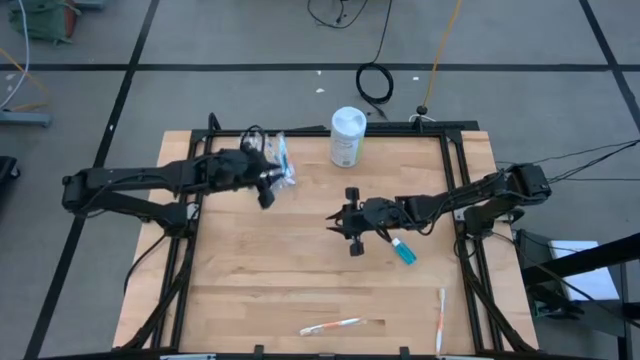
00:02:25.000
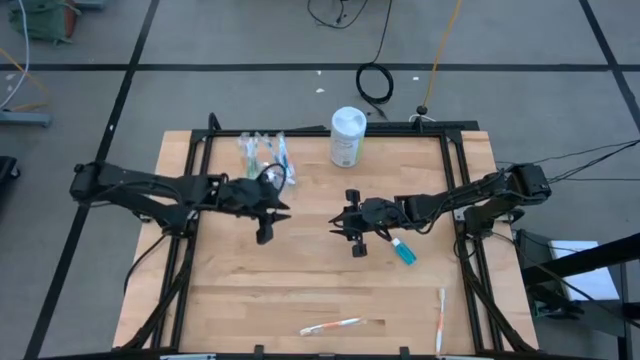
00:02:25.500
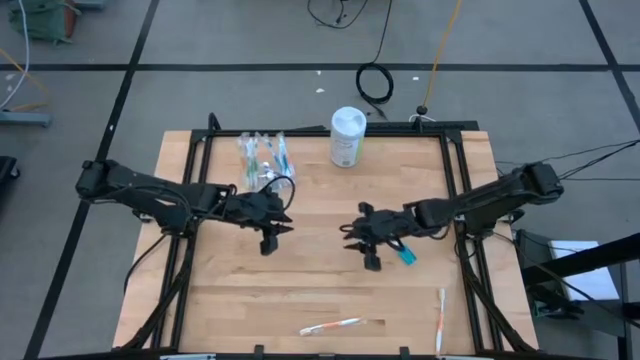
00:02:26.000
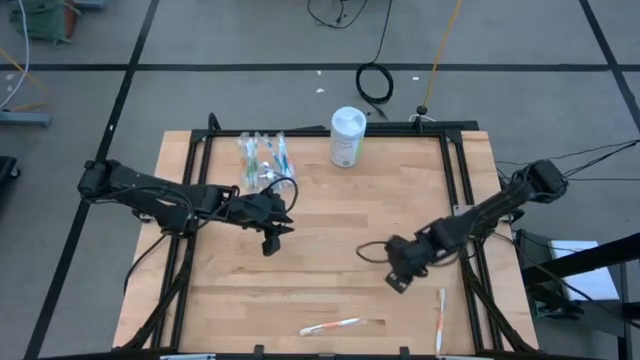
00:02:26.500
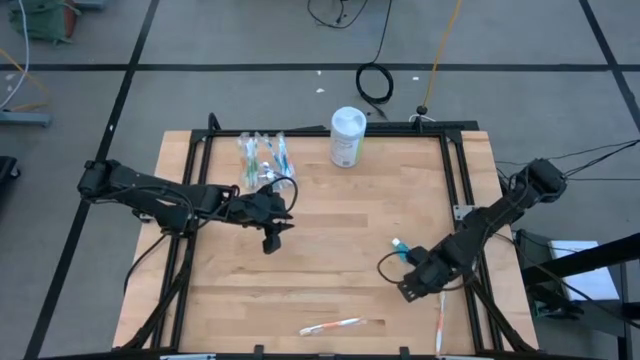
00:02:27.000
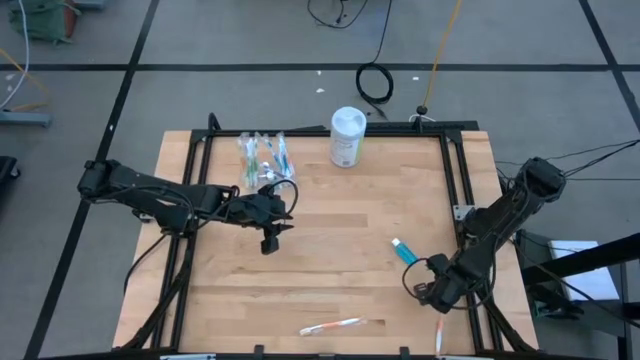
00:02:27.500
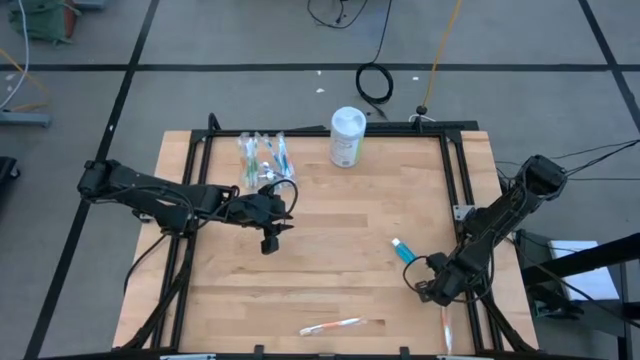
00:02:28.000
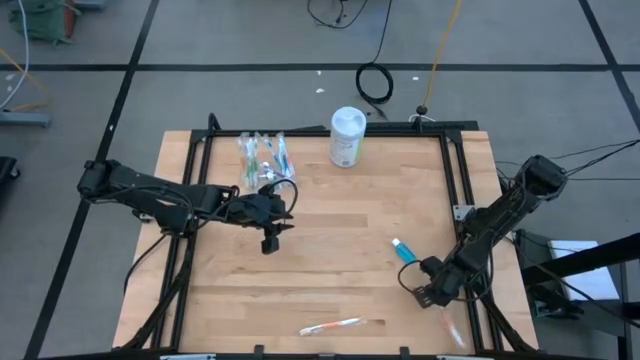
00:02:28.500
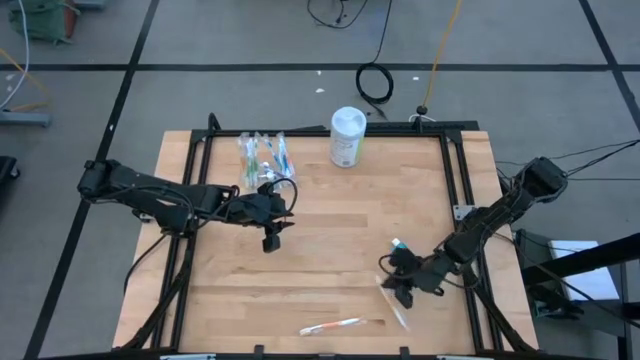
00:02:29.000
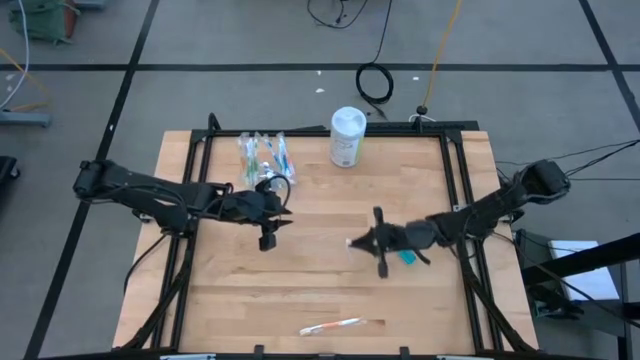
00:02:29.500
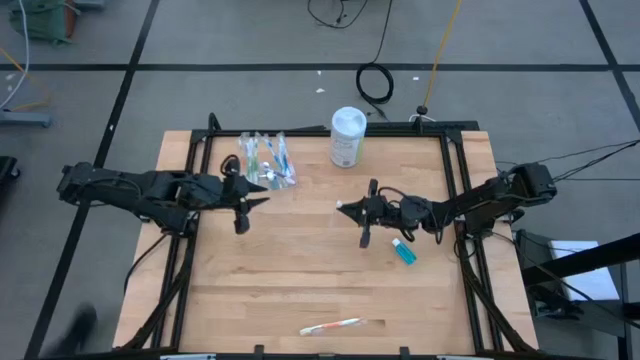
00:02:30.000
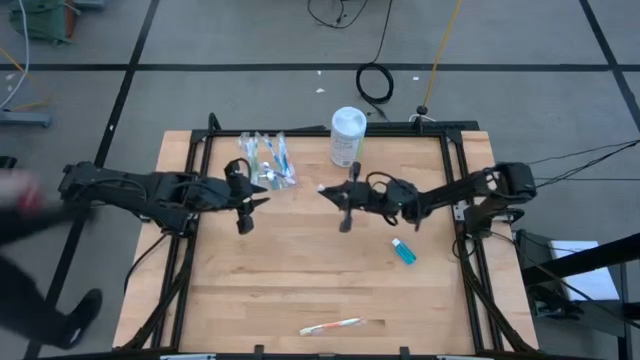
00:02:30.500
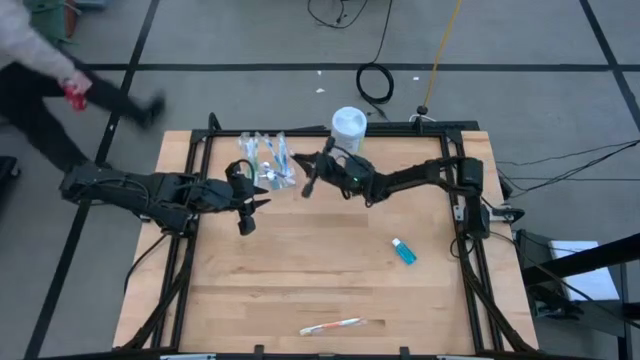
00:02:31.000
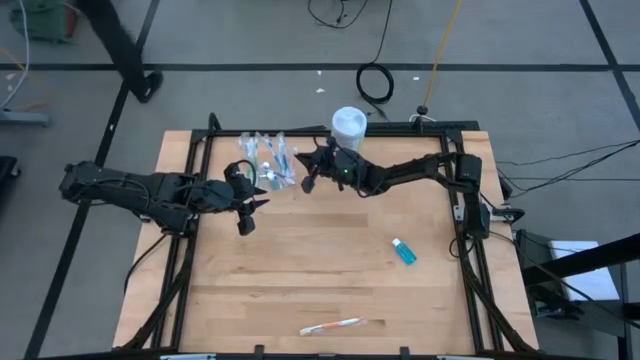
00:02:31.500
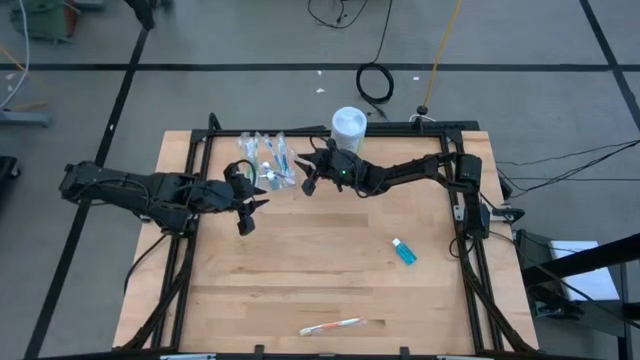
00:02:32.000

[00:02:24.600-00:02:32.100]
Task: Pick & Place toothbrushing station
Put the orange toothbrush into the right of the transparent organizer

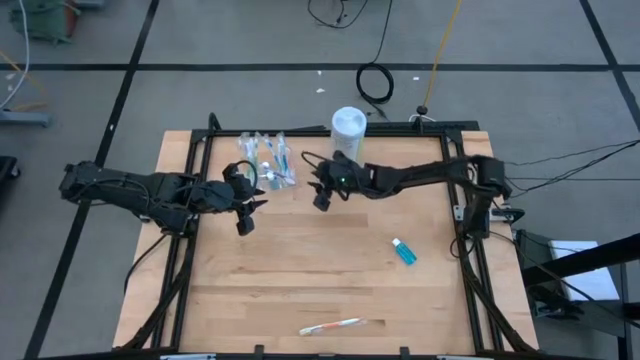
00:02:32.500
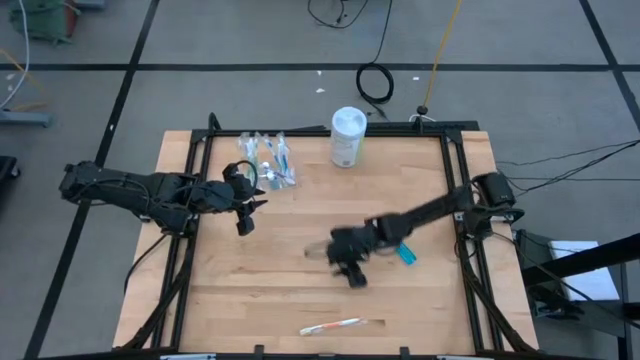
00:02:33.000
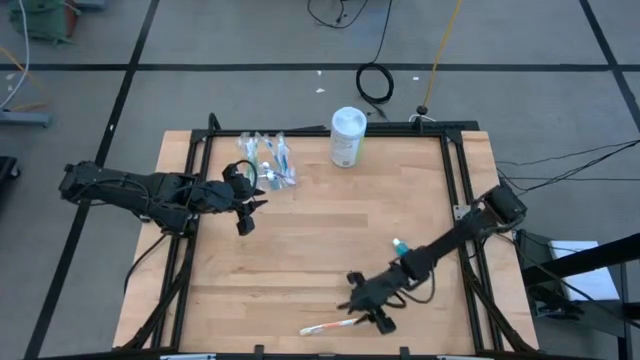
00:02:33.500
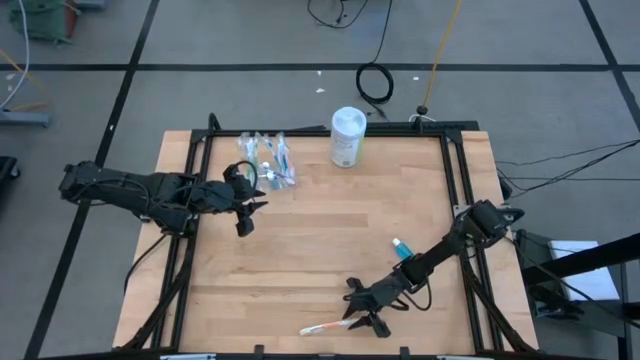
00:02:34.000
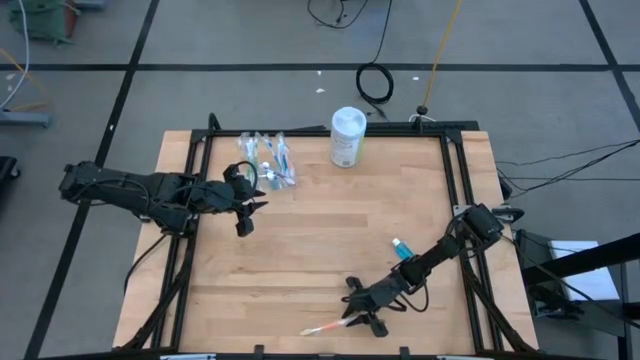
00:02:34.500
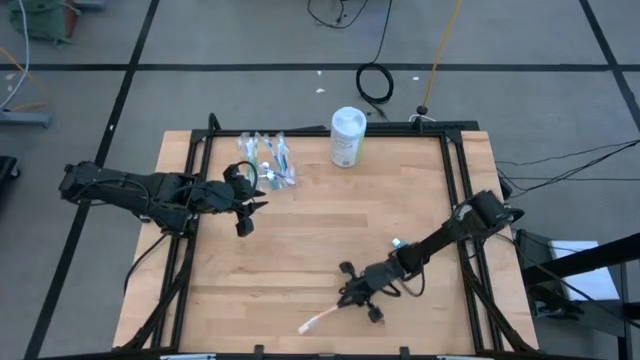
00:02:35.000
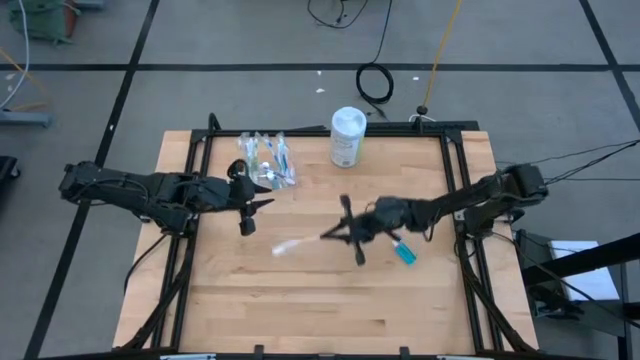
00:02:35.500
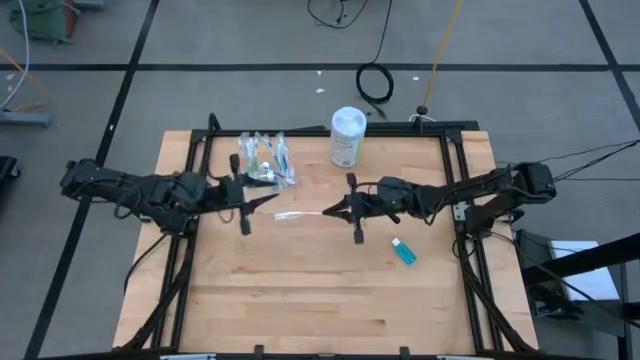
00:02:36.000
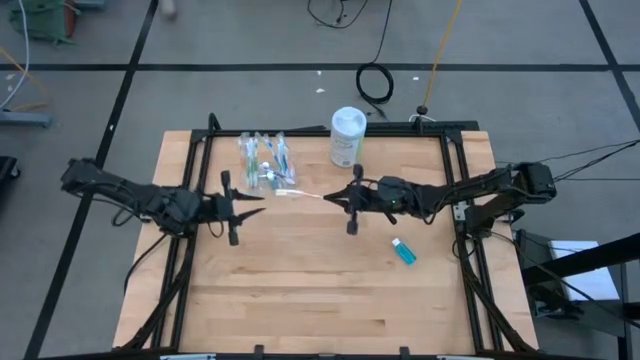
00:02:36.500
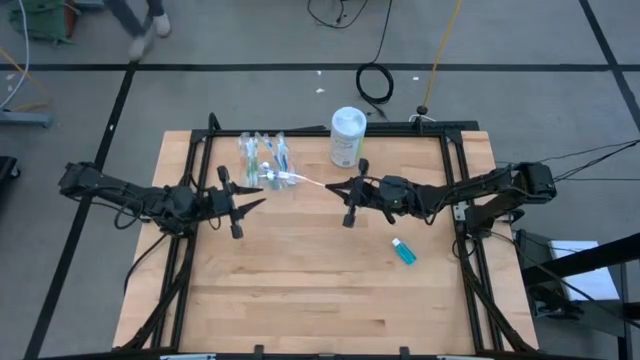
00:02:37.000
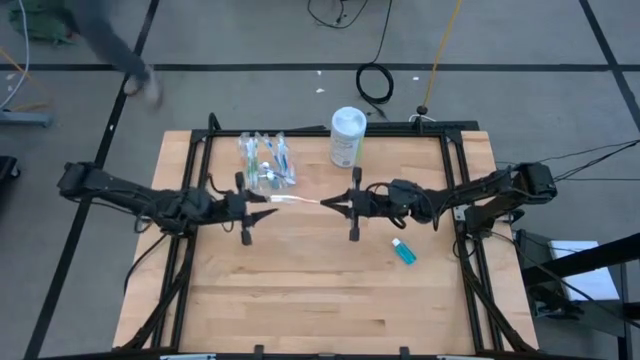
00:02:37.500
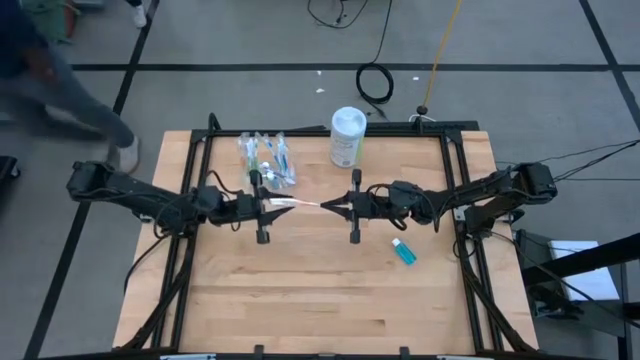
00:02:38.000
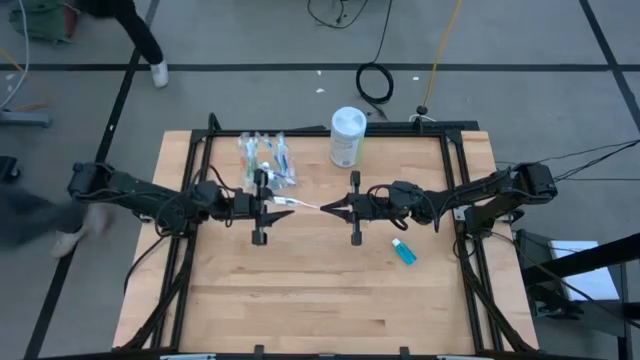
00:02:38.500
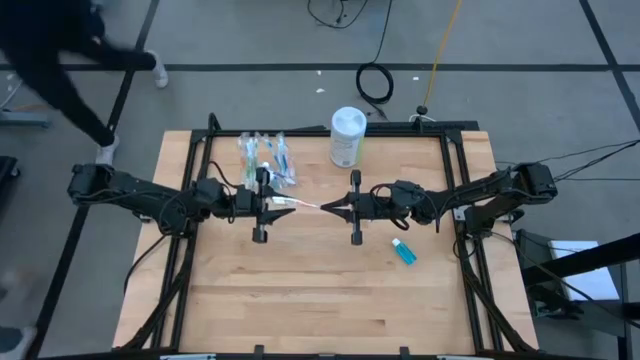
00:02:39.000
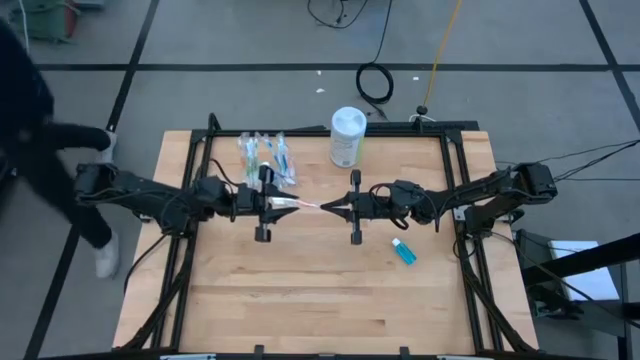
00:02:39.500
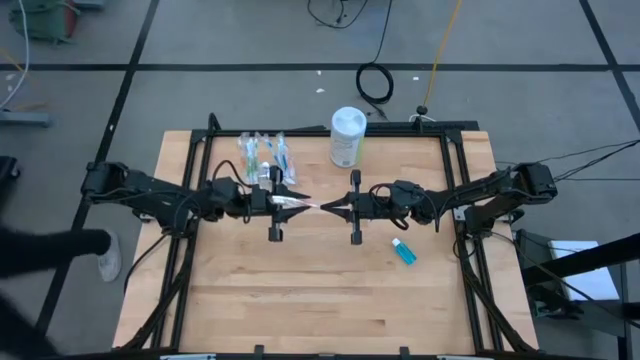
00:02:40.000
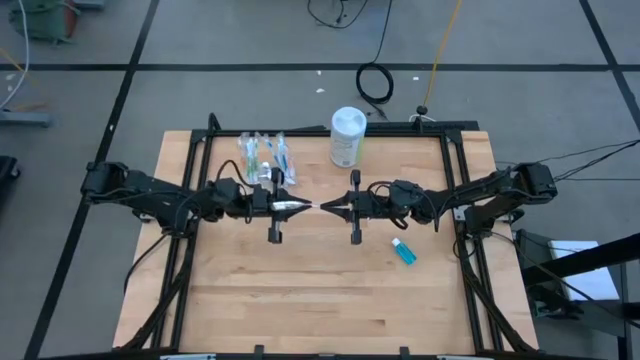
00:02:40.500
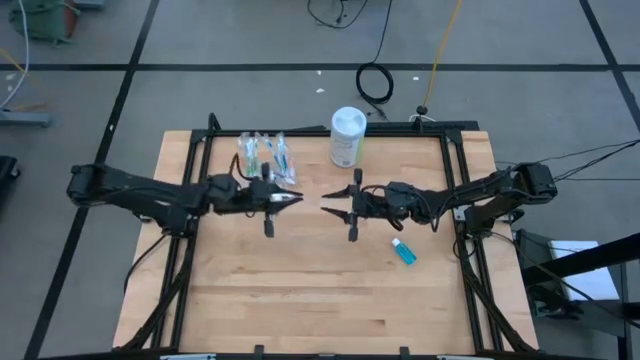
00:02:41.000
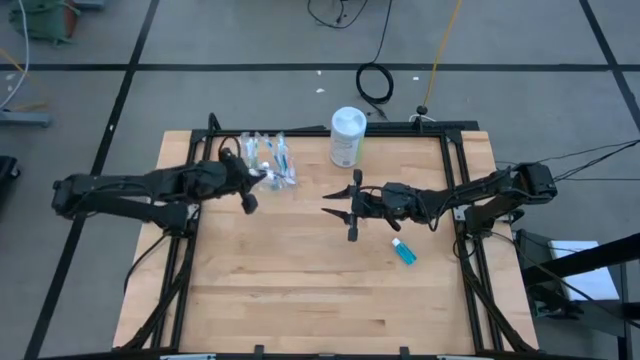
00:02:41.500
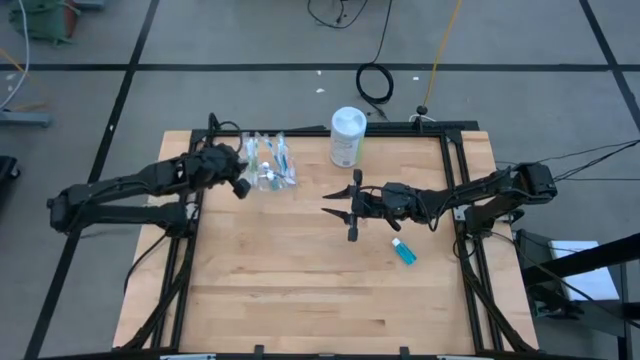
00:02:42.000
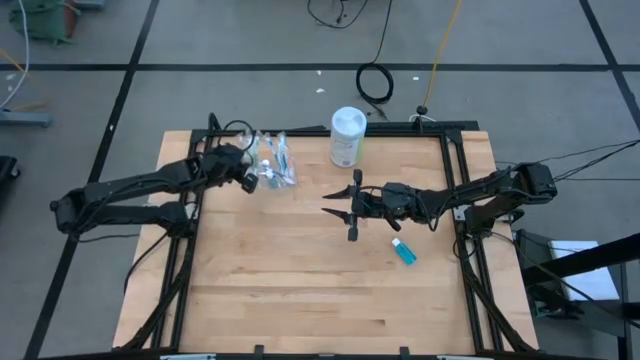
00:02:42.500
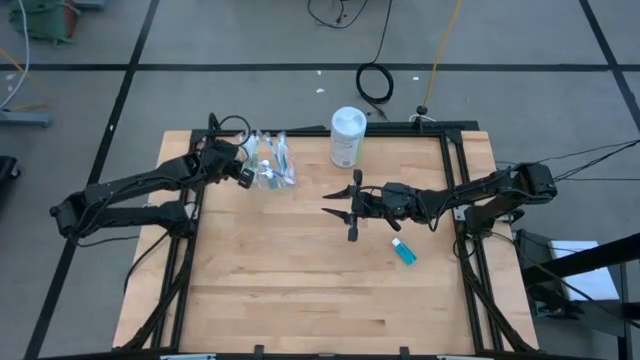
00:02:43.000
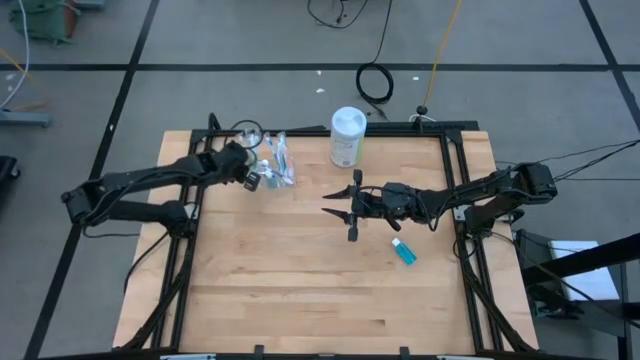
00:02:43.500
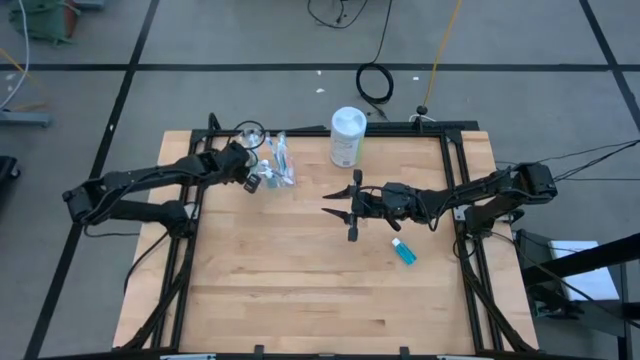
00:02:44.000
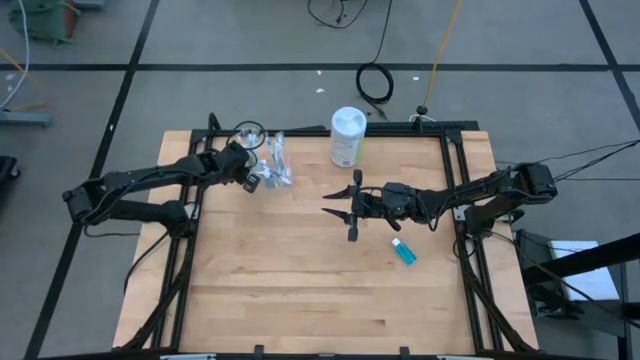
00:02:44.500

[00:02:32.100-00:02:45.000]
Put the orange toothbrush into the left of the transparent organizer

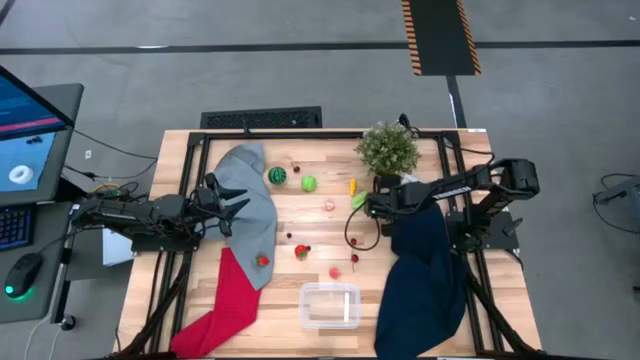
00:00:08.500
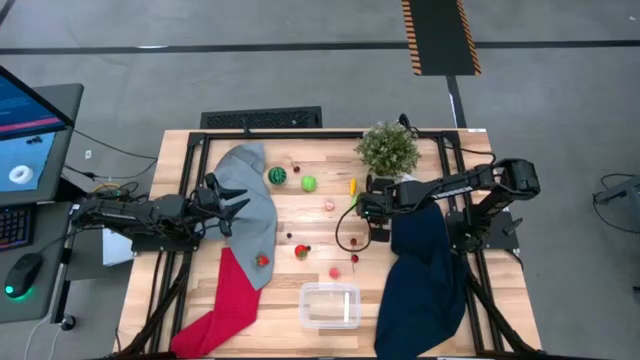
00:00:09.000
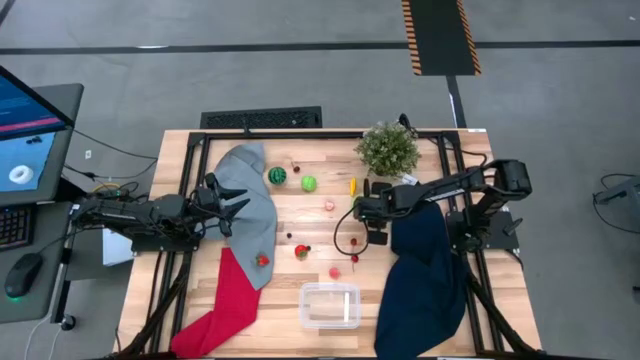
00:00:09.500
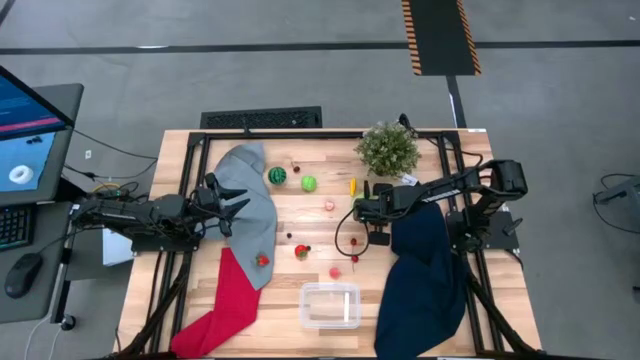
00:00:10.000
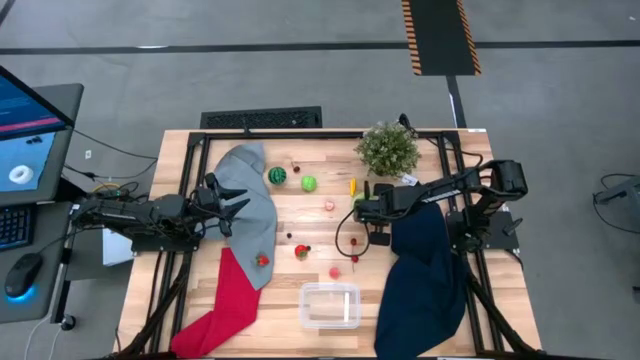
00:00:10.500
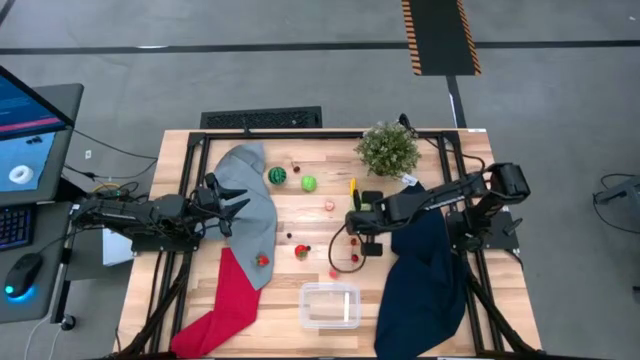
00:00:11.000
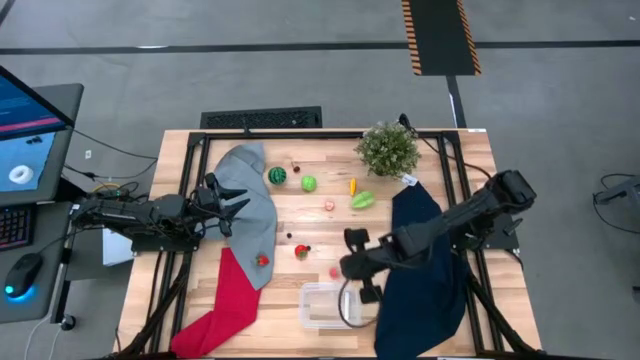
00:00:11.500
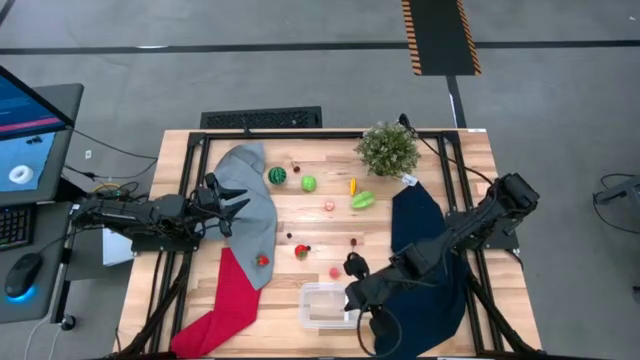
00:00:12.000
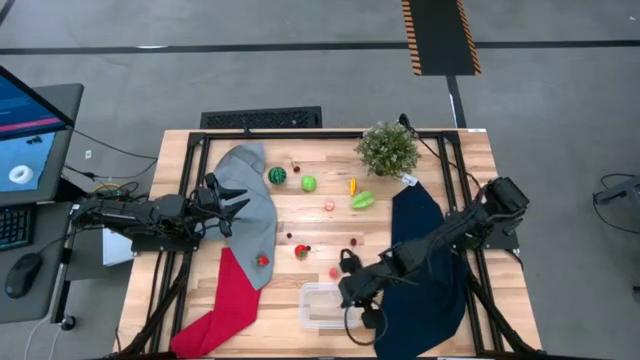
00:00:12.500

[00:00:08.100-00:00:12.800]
Task: Pick and placing Produce into tupperware
Put the cherry into the transparent bin
